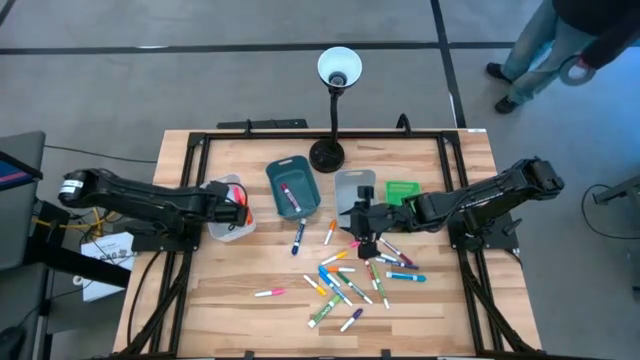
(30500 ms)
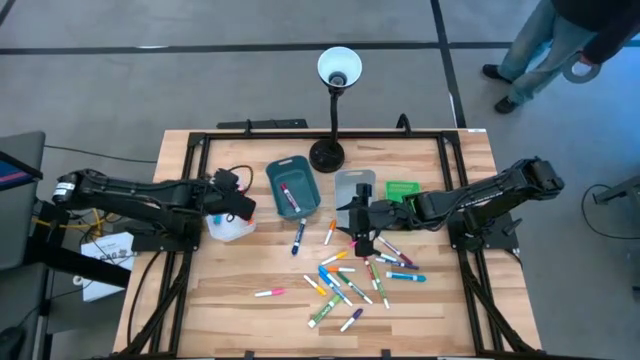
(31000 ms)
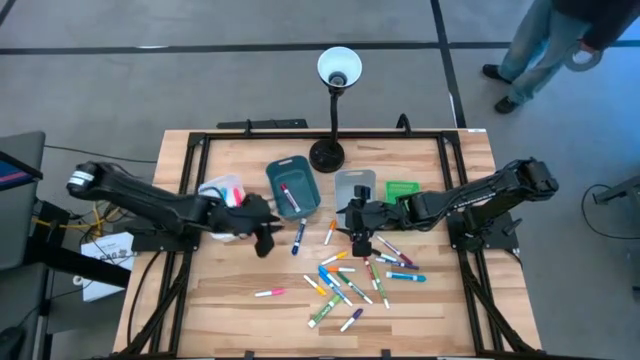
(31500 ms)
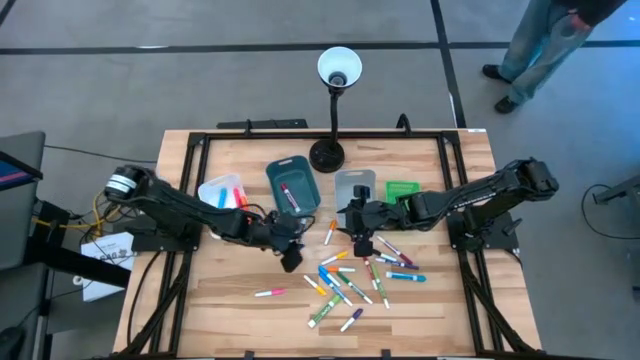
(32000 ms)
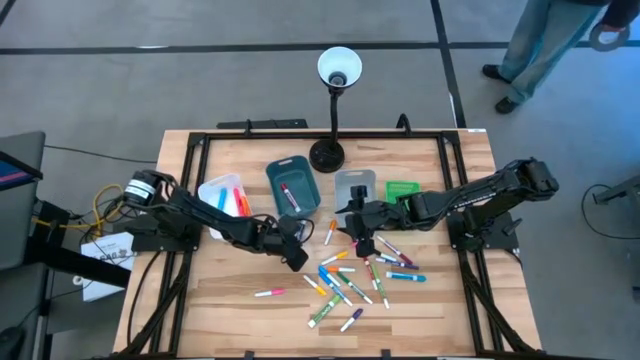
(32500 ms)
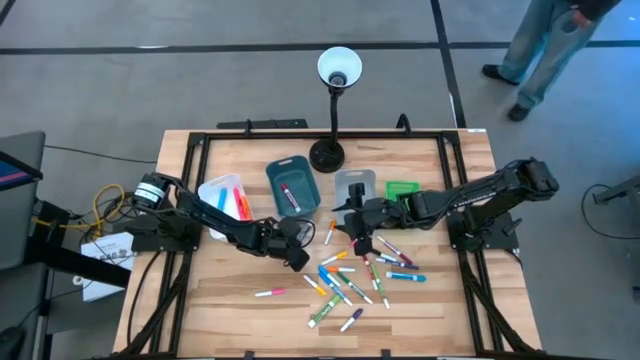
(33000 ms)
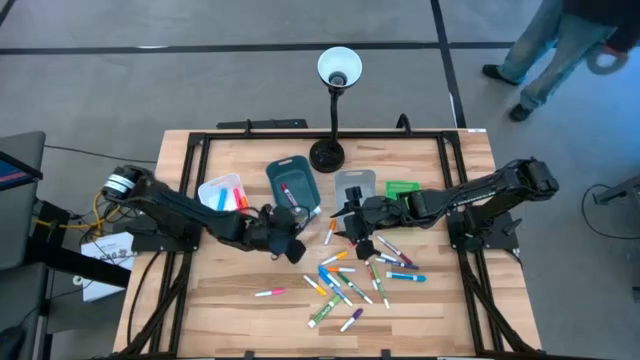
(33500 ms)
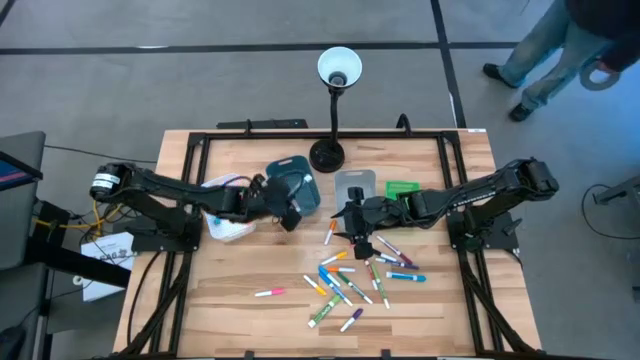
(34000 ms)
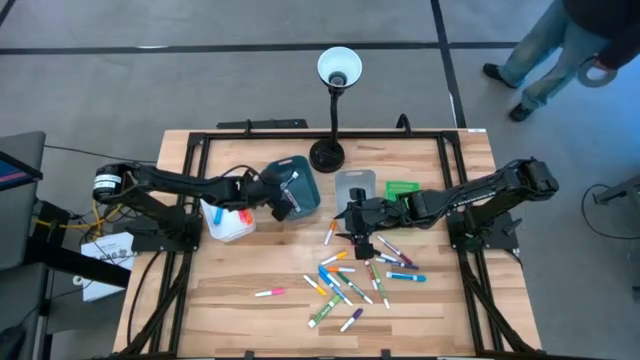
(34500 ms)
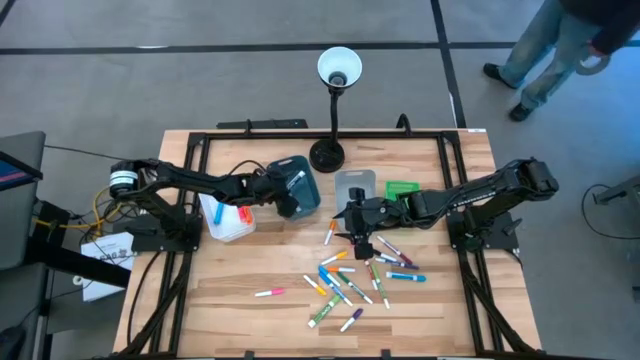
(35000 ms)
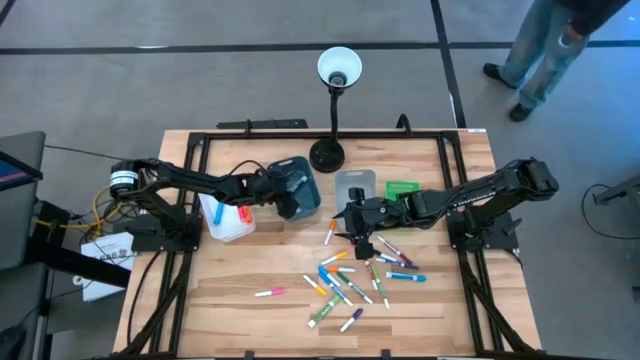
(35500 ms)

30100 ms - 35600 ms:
Task: Pick & Place Markers
Put the dark blue big marker pen into the blue bin

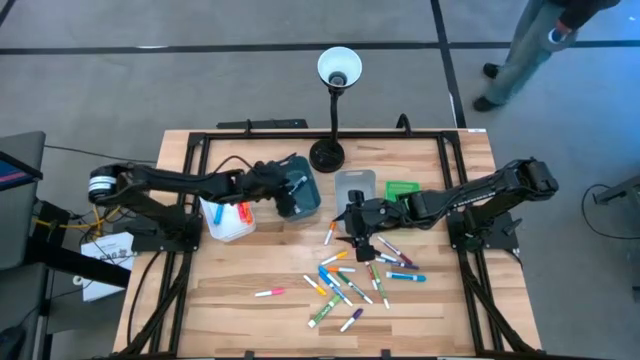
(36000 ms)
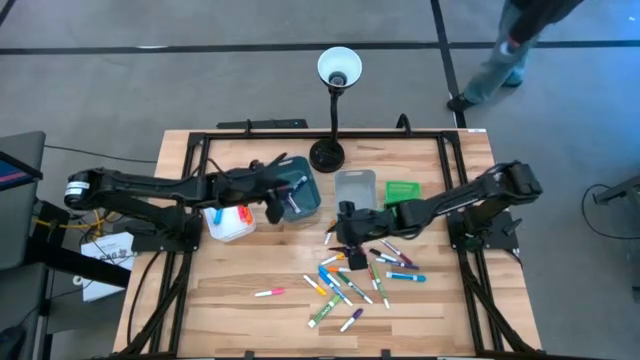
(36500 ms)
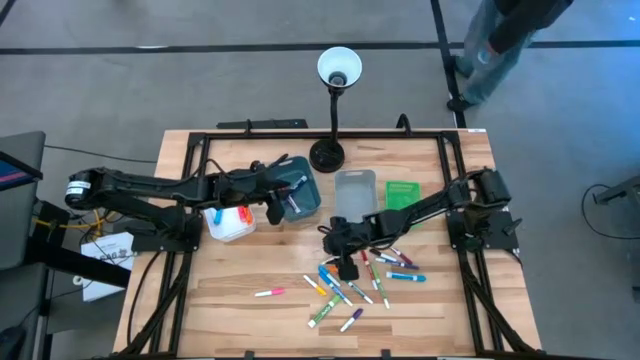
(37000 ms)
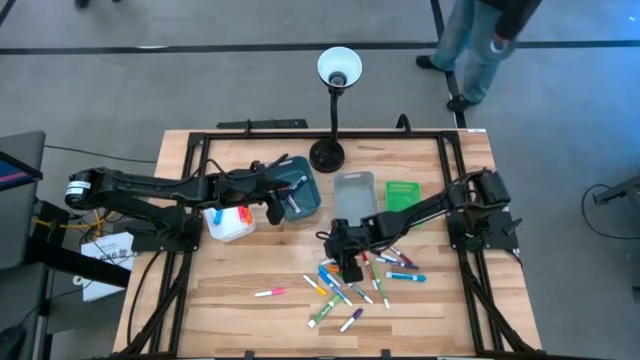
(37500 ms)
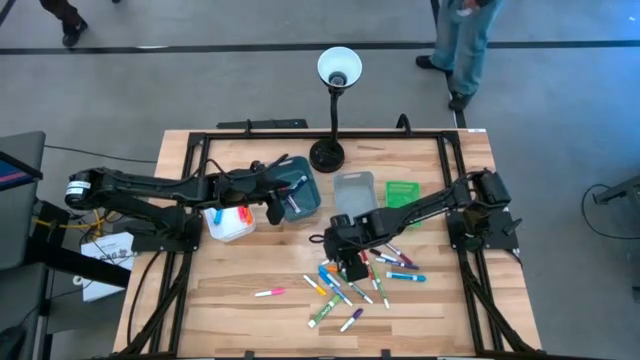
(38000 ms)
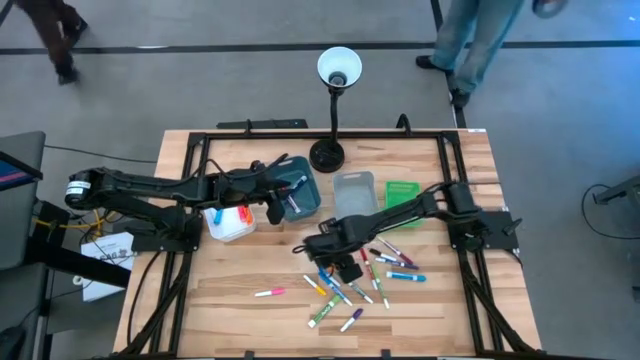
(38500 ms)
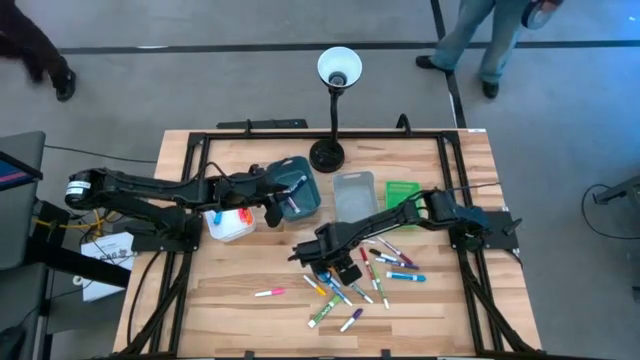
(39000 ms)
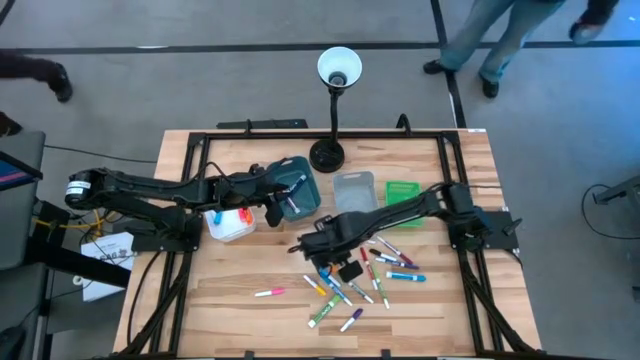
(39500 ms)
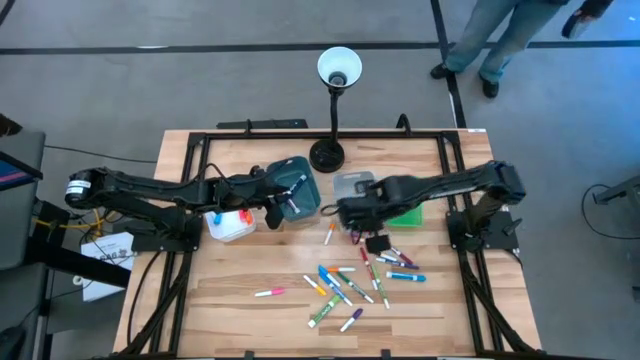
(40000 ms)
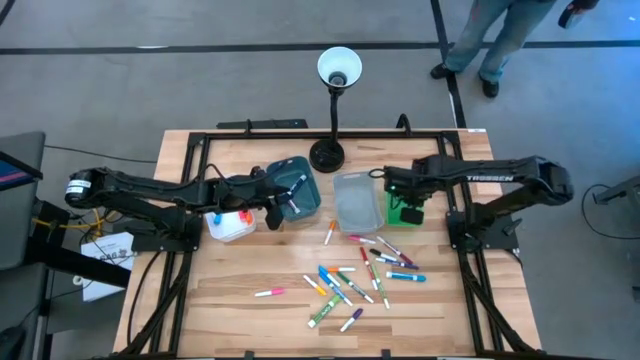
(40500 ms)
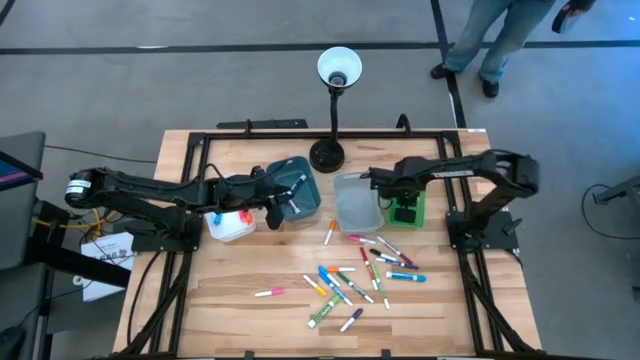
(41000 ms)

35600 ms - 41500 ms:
Put the yellow highlighter pen into the green bin

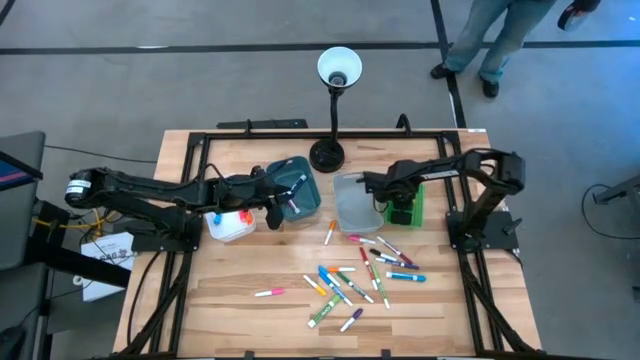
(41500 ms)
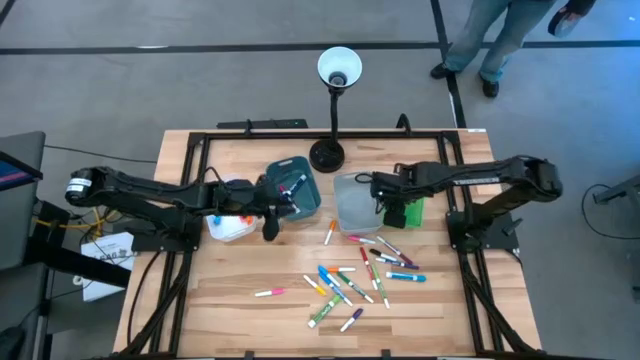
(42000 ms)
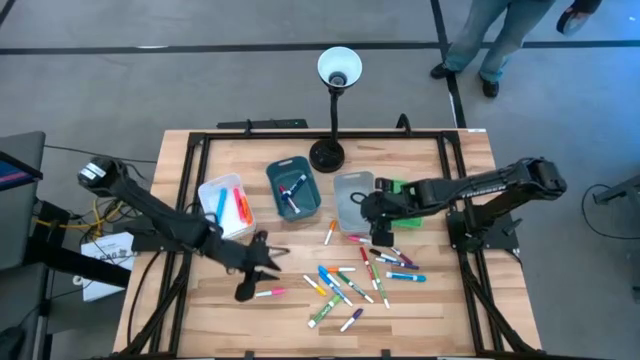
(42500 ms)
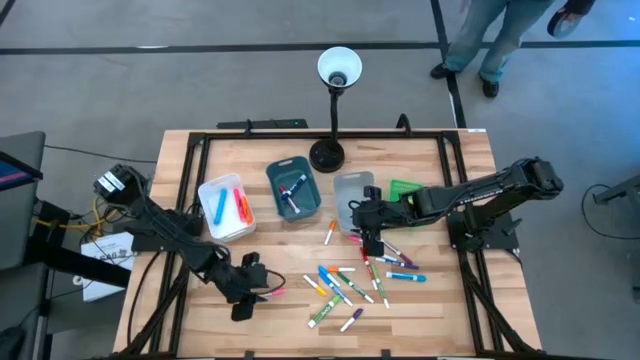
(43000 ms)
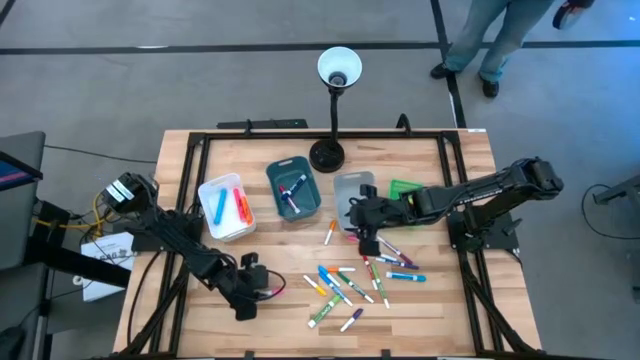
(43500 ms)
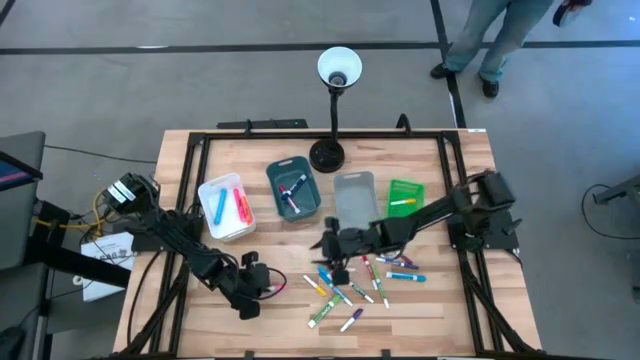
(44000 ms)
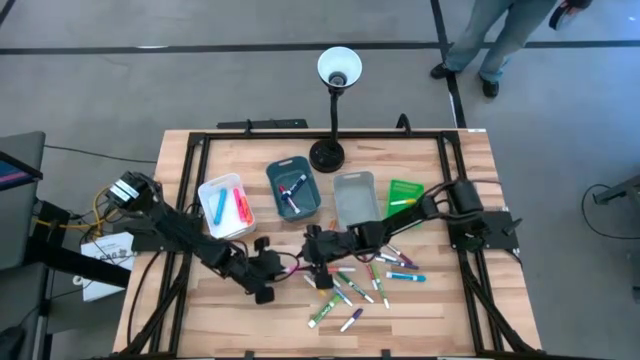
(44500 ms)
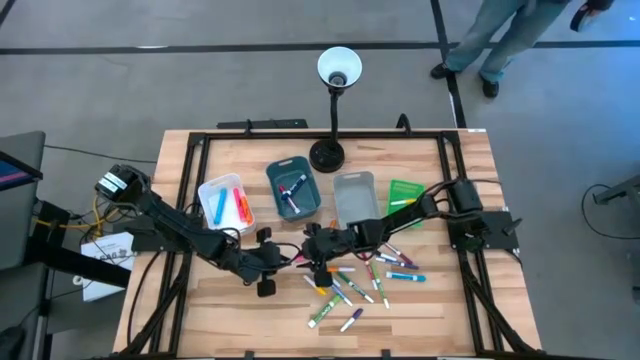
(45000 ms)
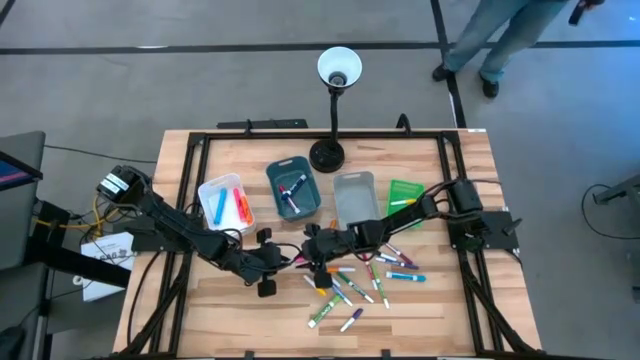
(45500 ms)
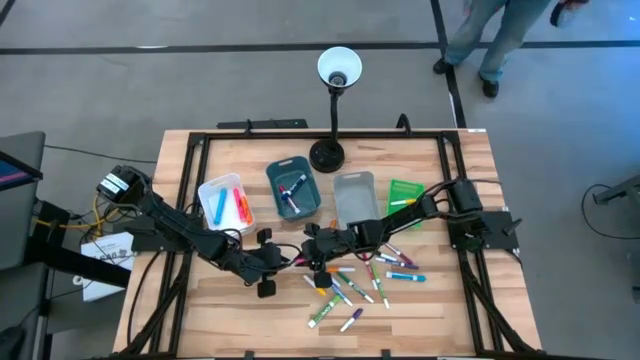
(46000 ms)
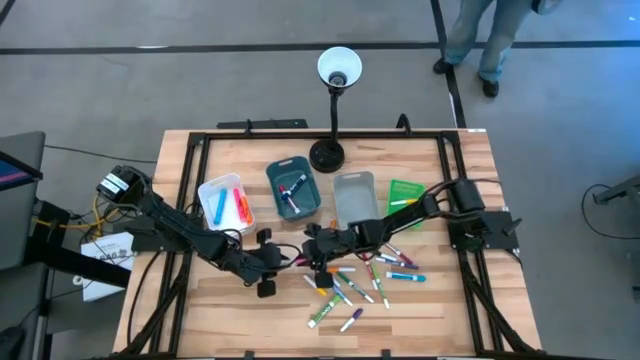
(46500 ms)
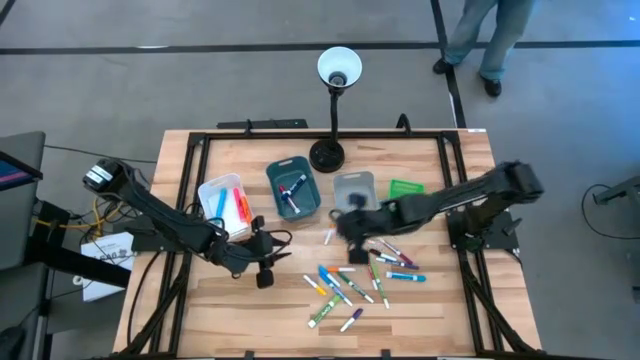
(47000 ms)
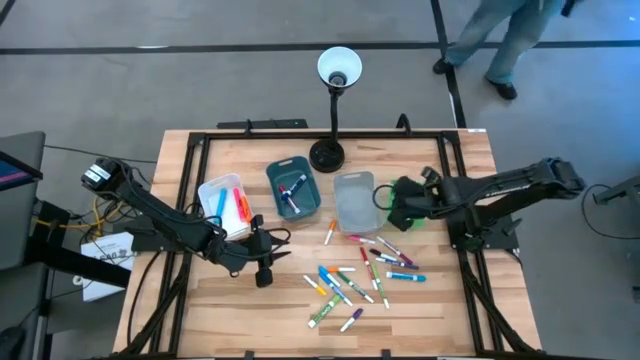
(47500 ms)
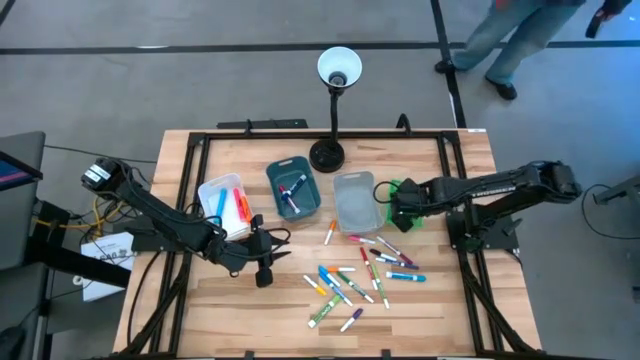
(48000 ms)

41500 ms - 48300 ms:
Put the pink highlighter pen into the green bin

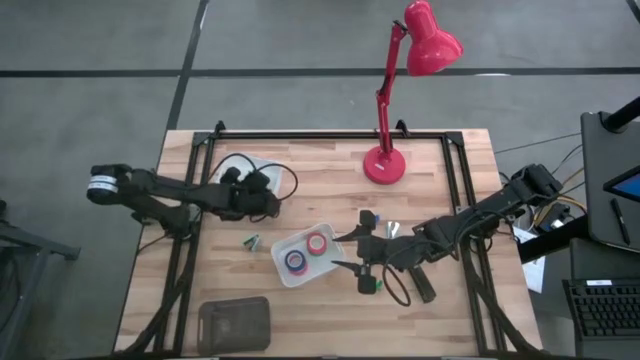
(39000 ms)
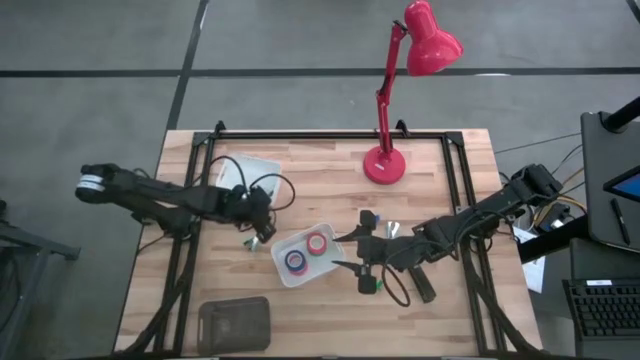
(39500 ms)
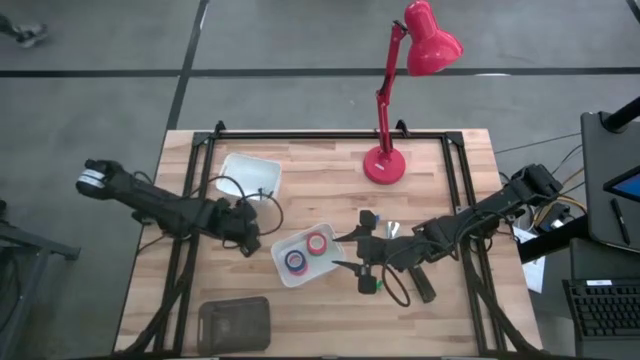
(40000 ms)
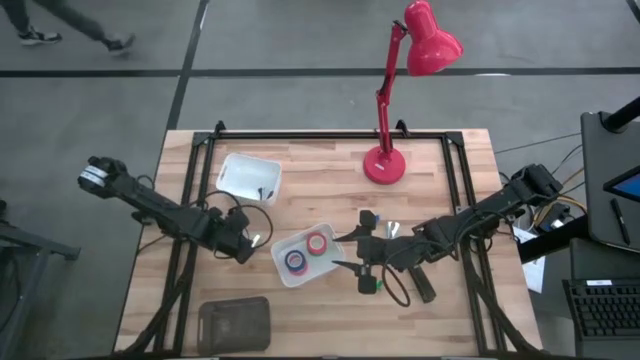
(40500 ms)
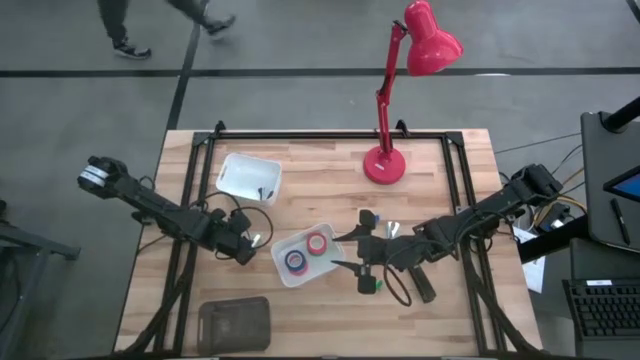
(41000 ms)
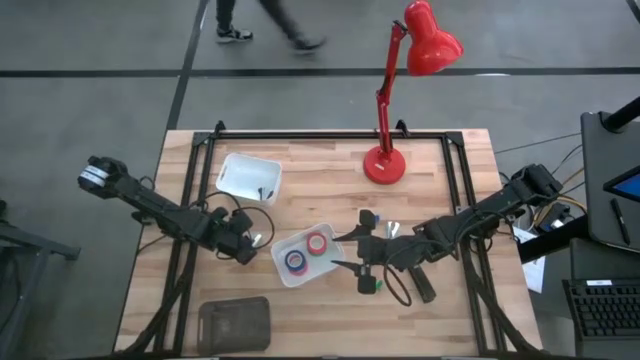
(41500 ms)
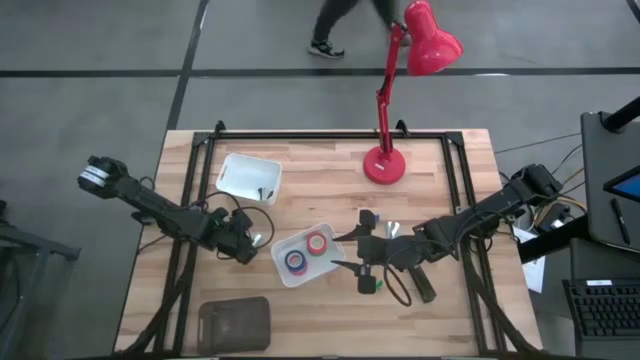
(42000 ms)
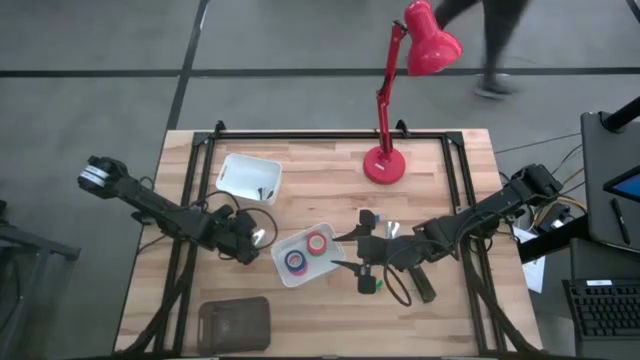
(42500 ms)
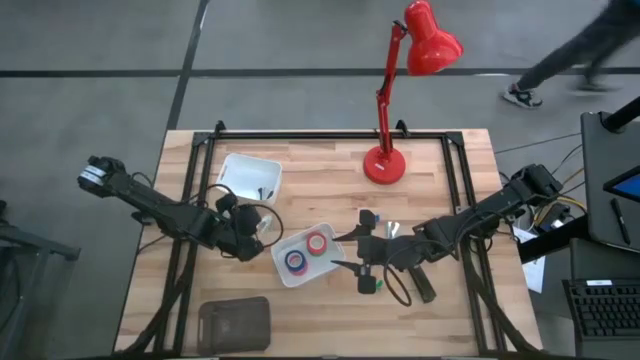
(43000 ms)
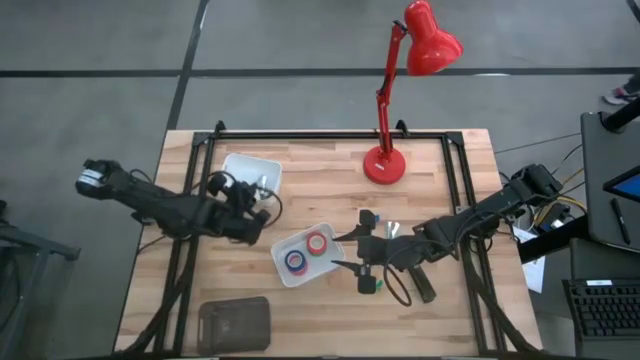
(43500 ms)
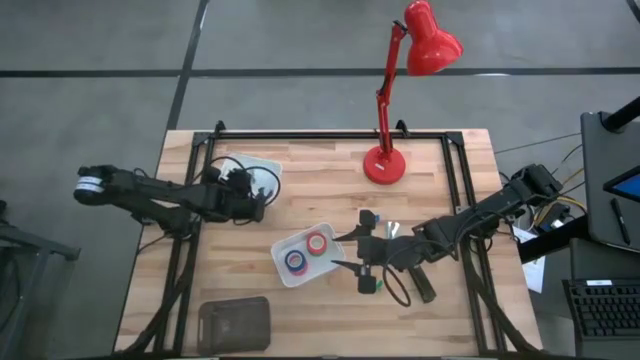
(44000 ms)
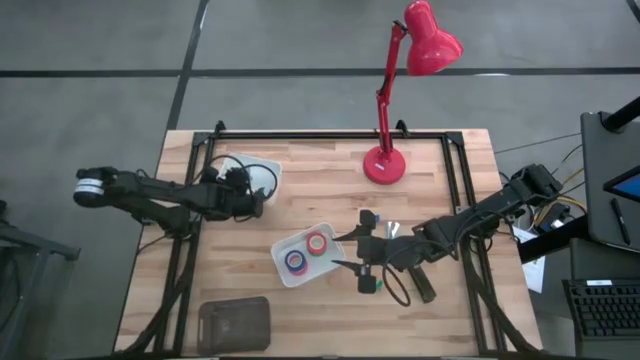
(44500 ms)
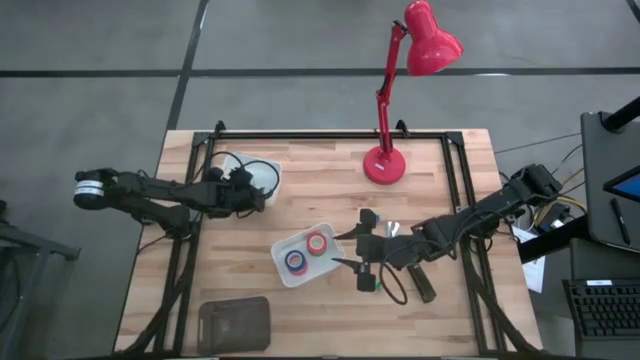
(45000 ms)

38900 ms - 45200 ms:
Task: Pick and place Stapler, Stapler remover, tape
Put the left light blue staple remover into the top white bin
